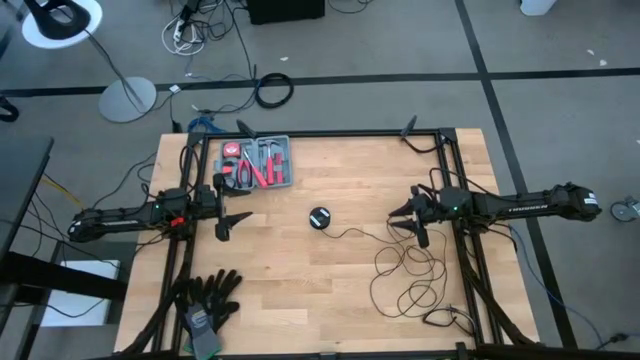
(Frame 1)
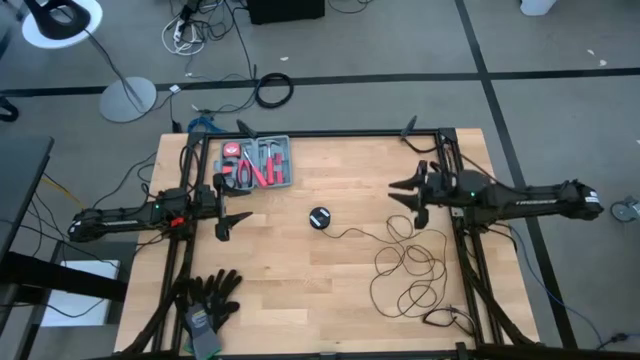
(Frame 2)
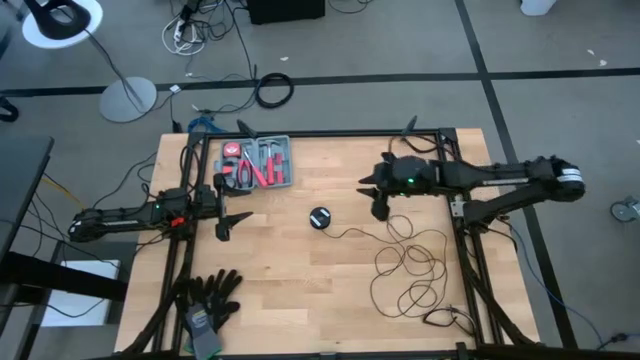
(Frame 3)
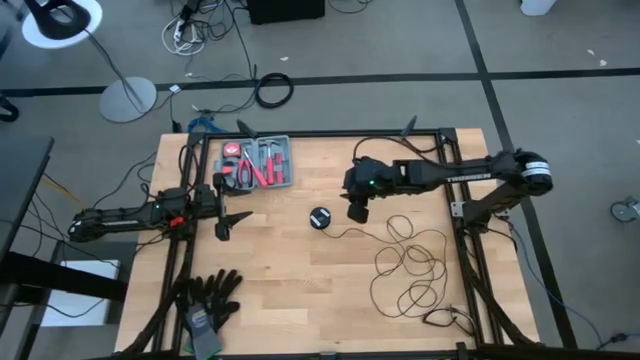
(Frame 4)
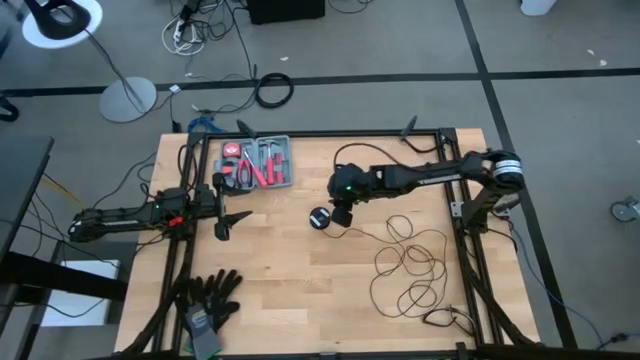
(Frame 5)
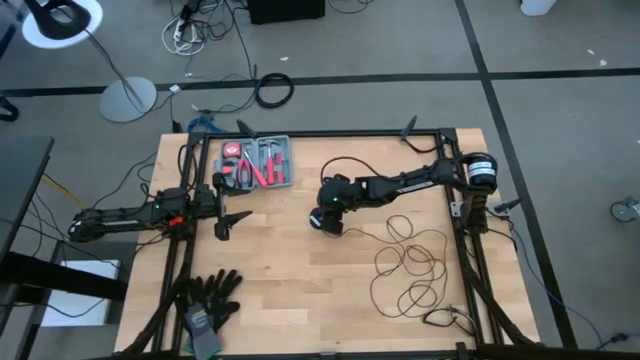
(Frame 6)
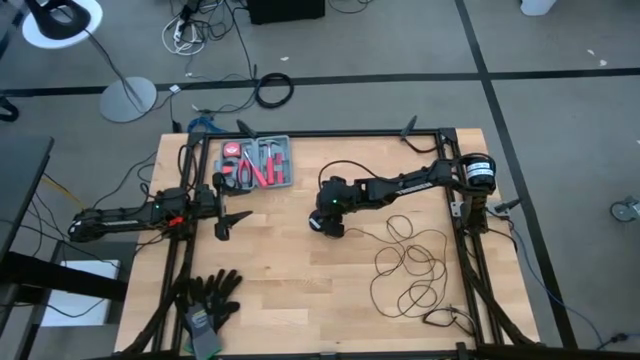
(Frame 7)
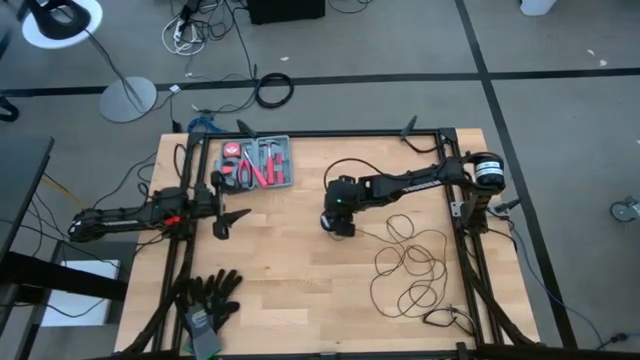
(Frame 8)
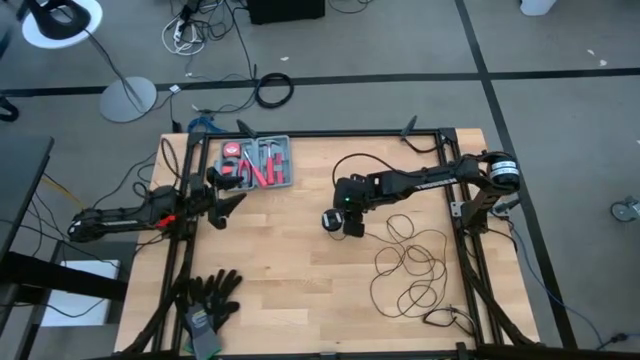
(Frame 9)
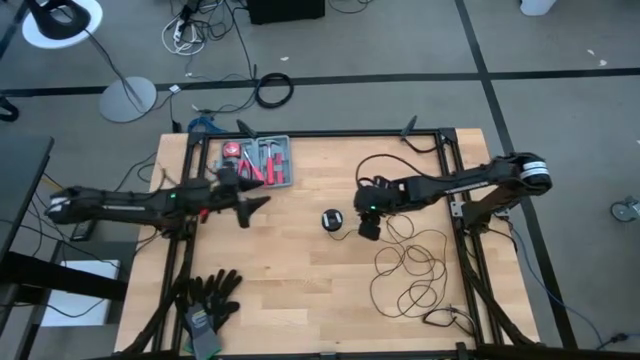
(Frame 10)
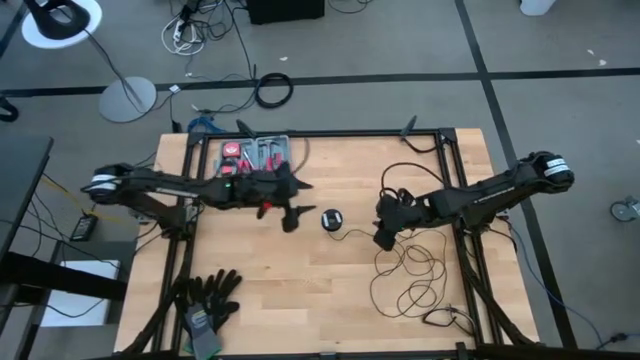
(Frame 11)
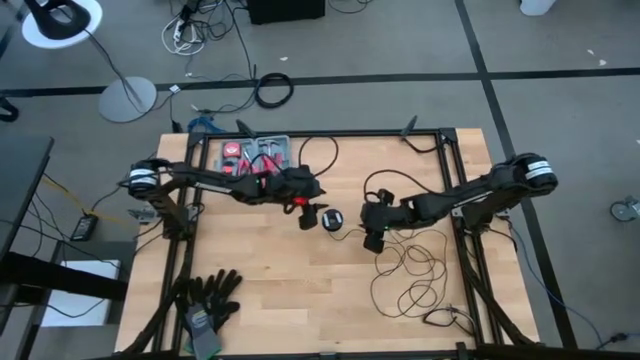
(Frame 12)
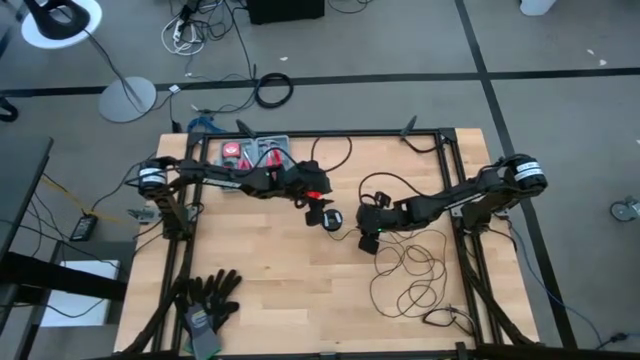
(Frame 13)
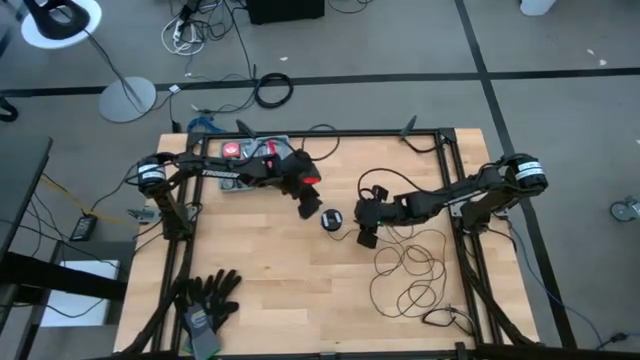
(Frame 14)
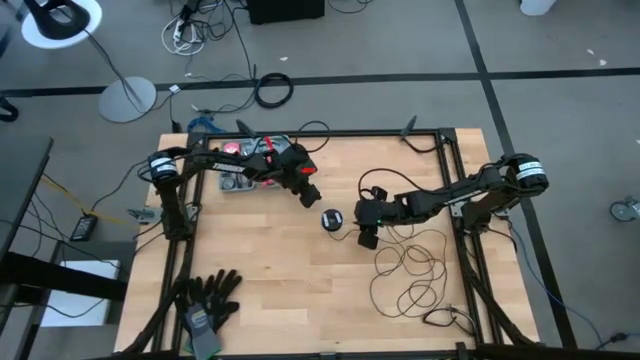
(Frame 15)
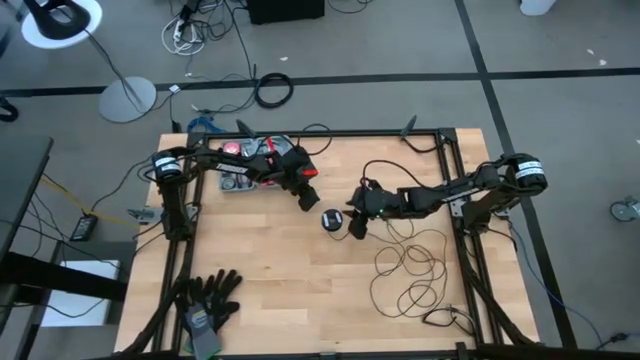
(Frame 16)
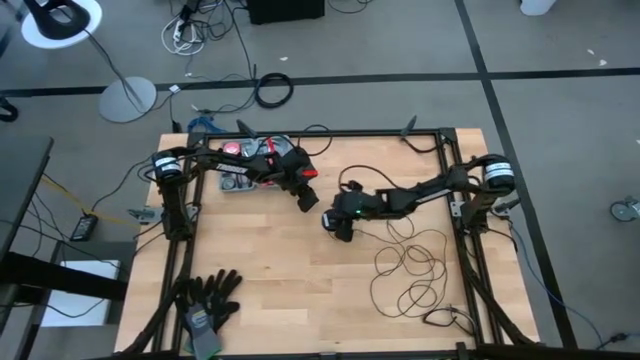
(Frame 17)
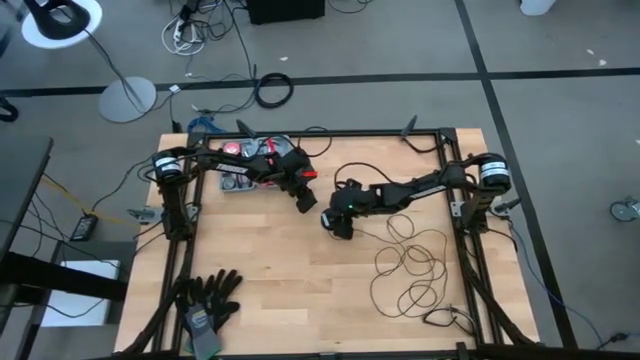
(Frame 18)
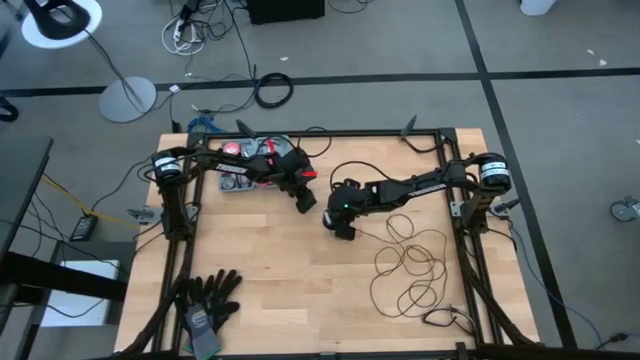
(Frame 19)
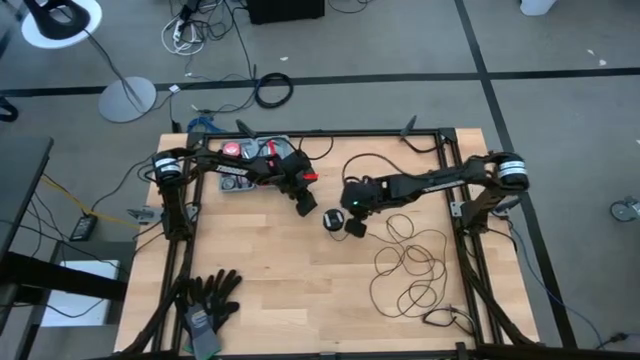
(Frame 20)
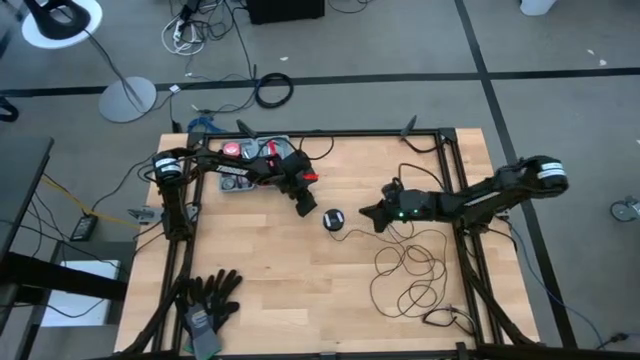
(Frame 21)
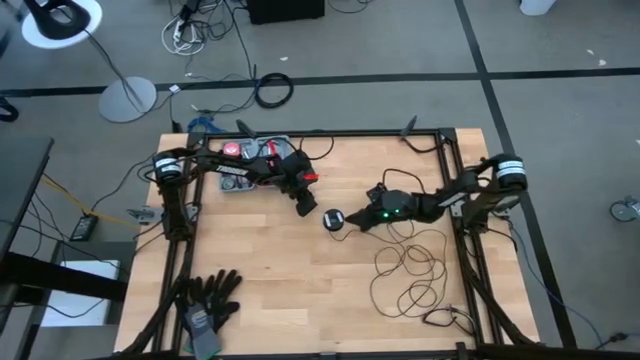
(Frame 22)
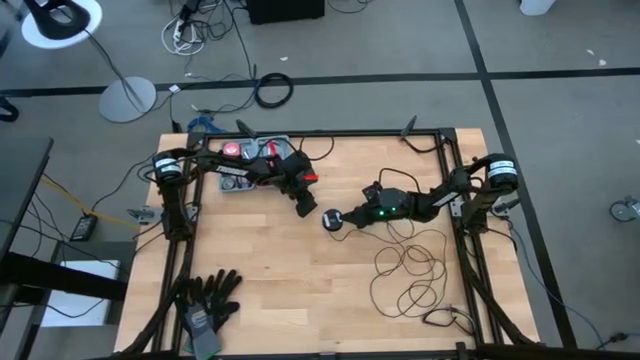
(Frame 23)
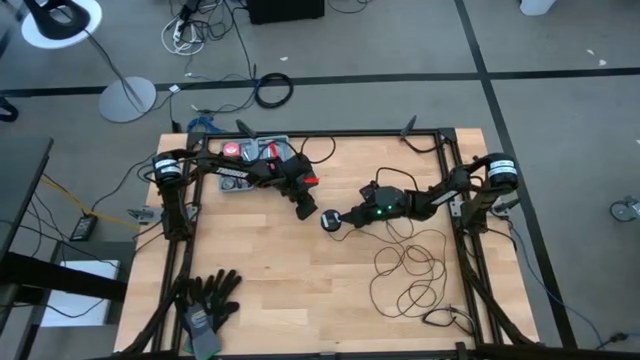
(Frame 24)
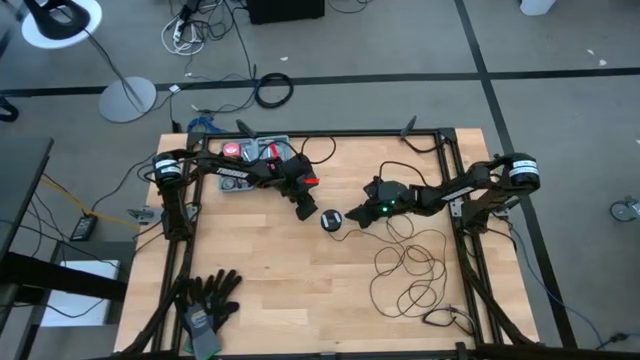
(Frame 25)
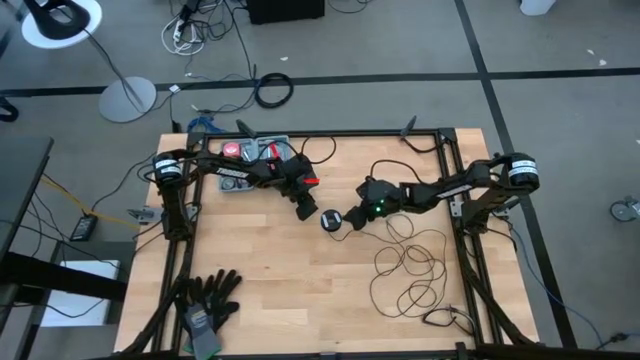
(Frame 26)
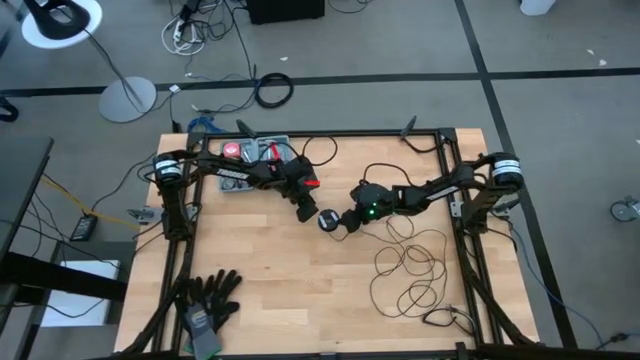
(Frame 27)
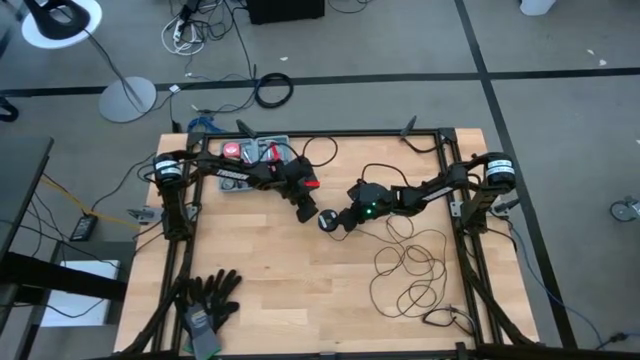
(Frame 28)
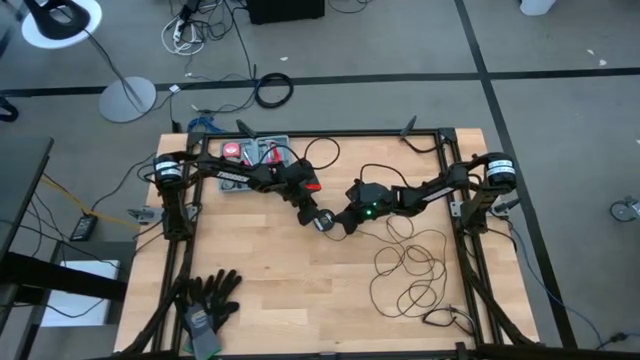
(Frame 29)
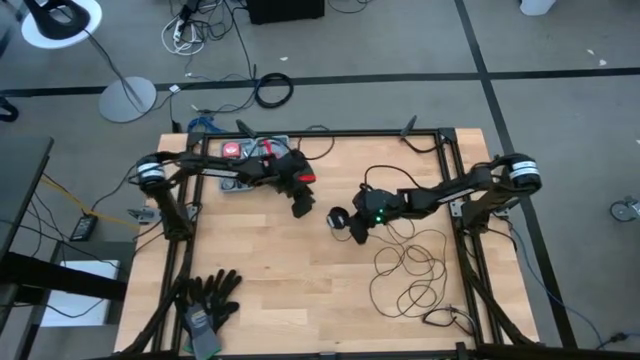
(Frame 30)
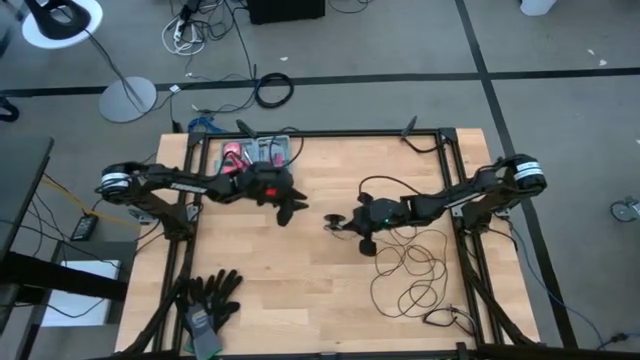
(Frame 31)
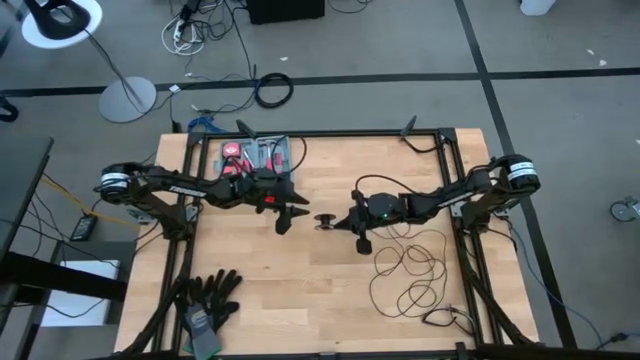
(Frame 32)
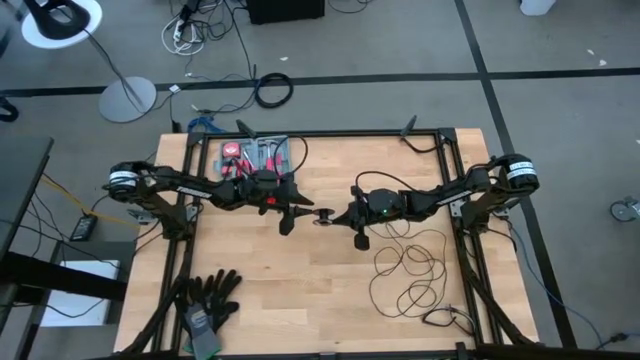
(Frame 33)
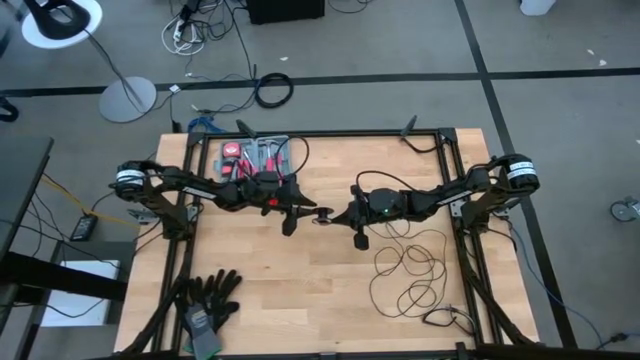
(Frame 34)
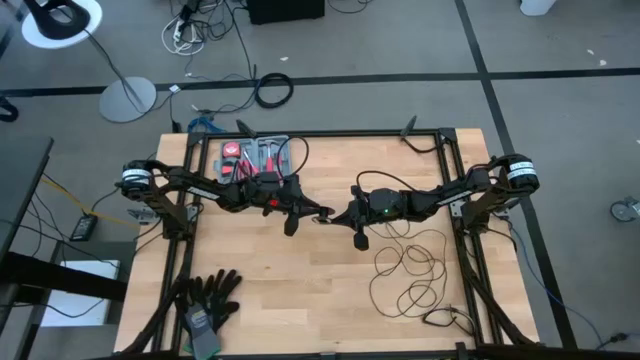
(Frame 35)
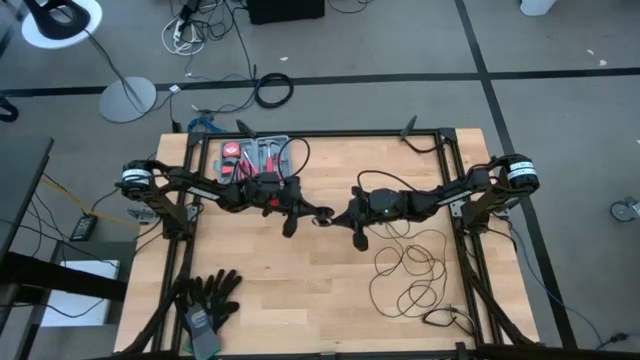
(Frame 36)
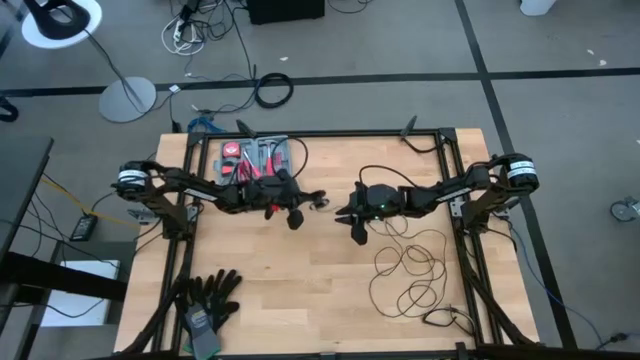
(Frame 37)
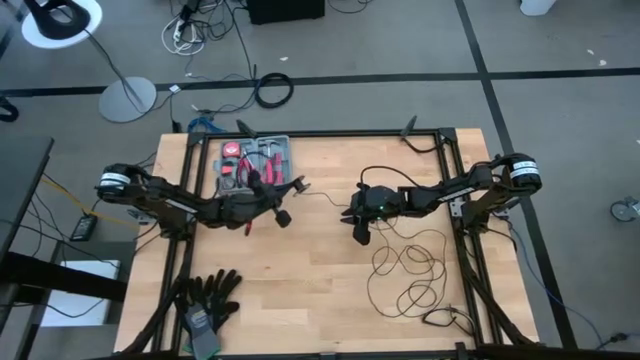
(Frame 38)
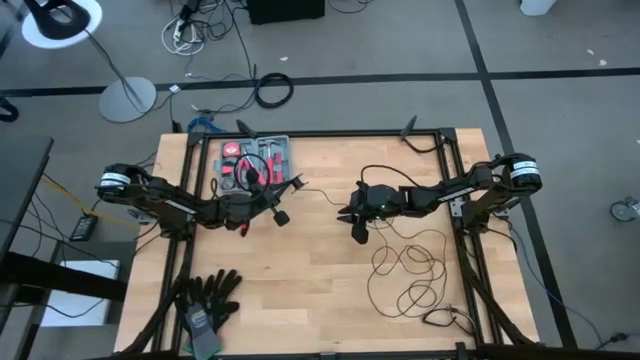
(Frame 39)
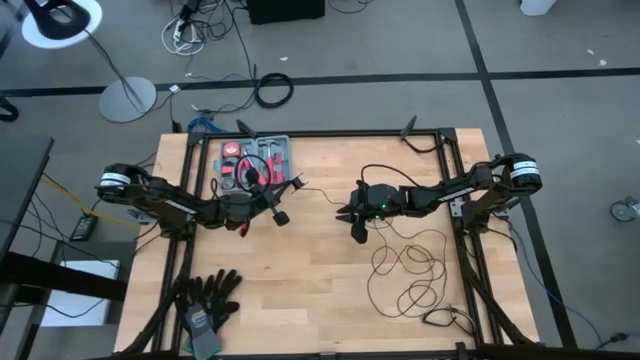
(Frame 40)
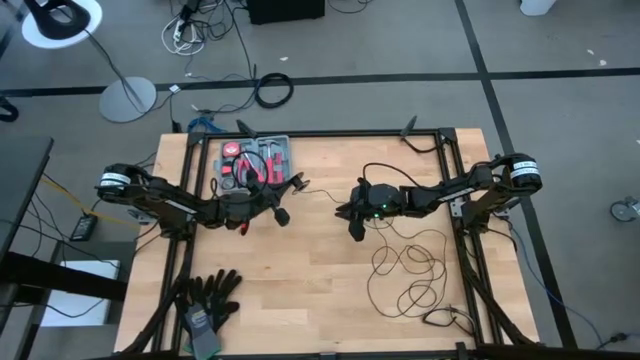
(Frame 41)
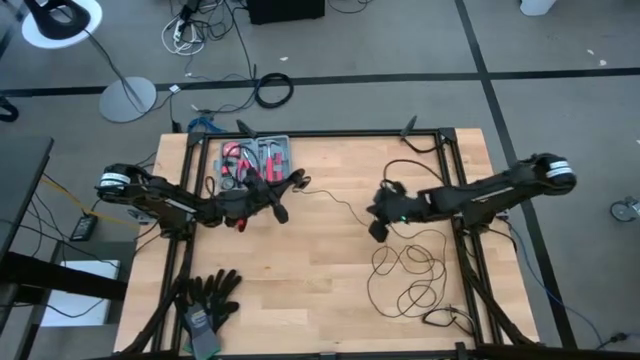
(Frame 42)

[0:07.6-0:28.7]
Task: Coil cords
Coil the black cable wire on the spool
